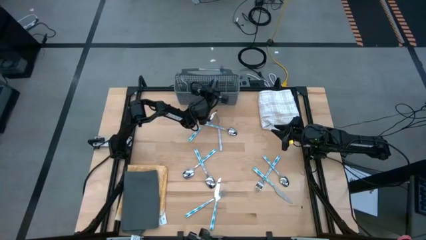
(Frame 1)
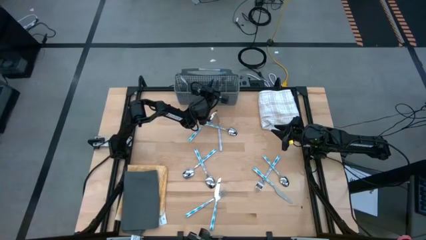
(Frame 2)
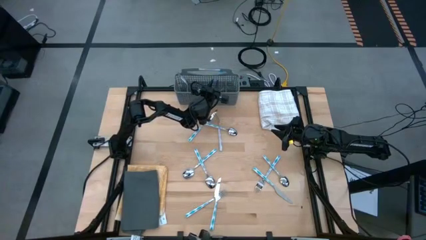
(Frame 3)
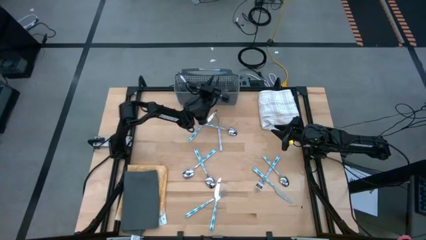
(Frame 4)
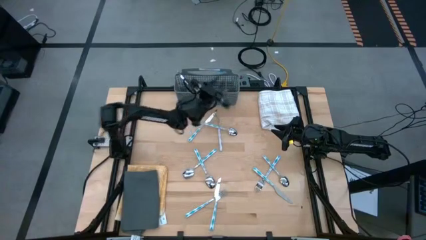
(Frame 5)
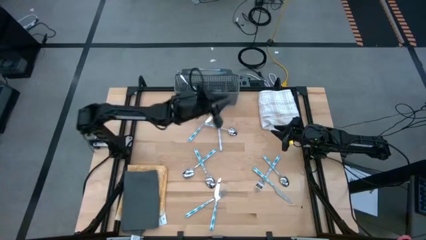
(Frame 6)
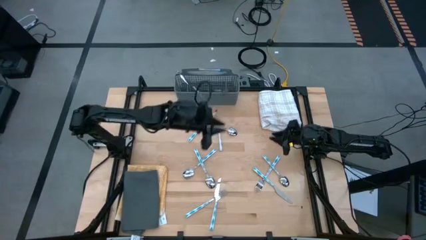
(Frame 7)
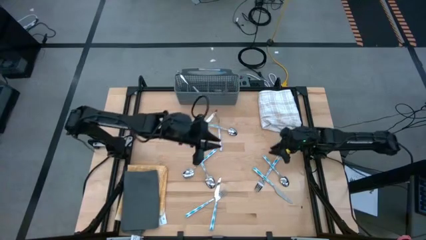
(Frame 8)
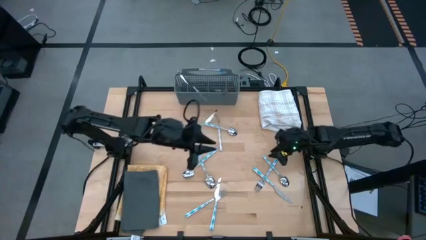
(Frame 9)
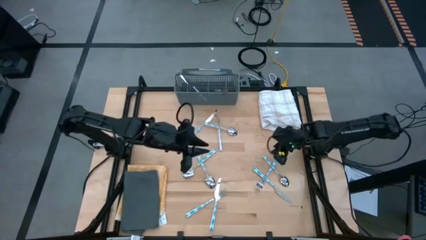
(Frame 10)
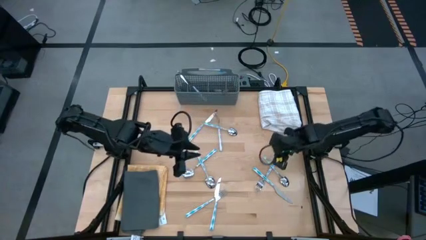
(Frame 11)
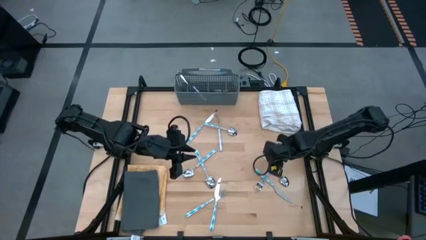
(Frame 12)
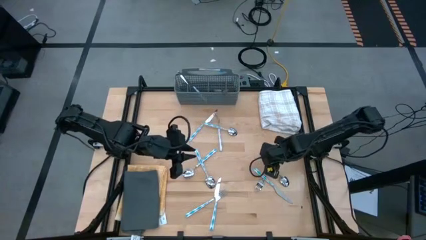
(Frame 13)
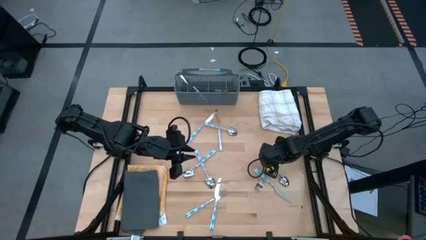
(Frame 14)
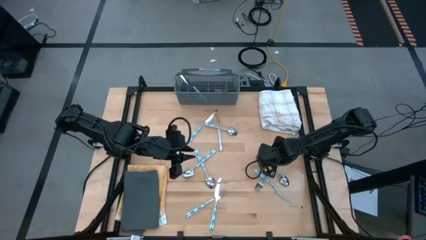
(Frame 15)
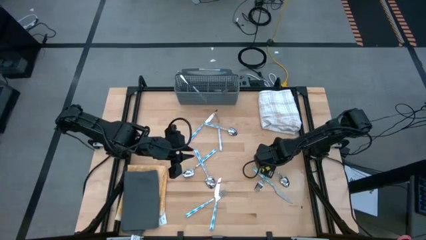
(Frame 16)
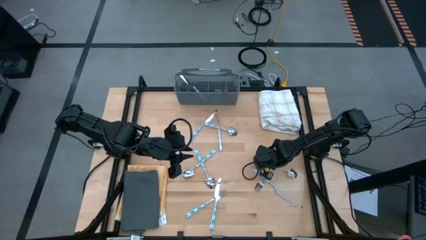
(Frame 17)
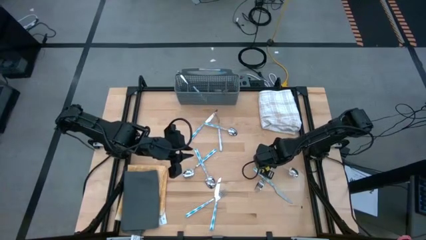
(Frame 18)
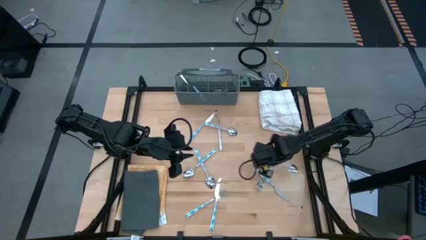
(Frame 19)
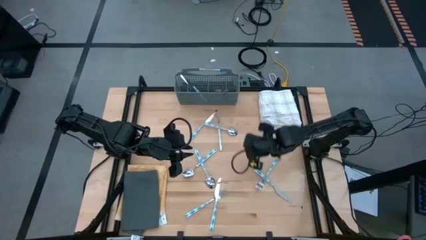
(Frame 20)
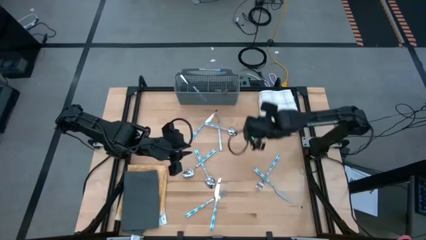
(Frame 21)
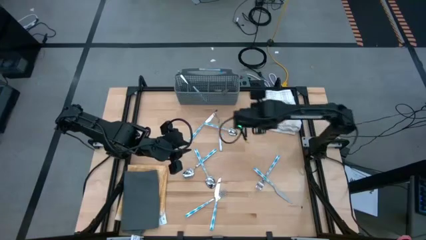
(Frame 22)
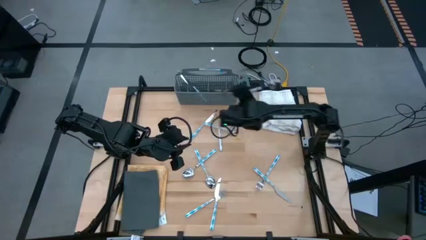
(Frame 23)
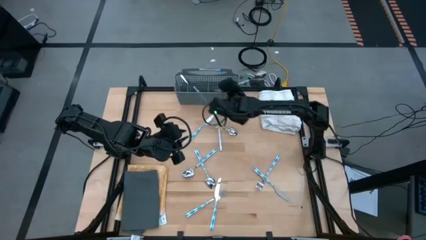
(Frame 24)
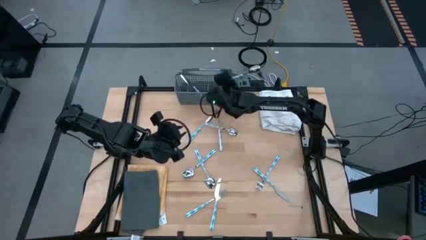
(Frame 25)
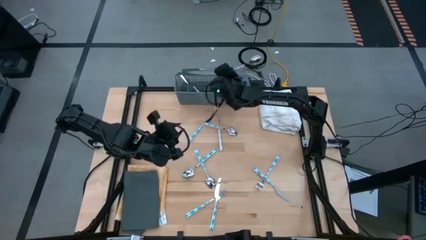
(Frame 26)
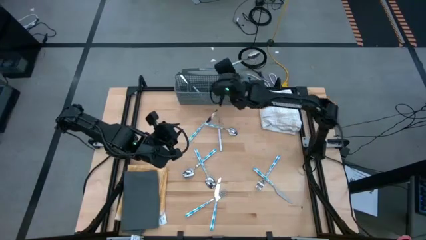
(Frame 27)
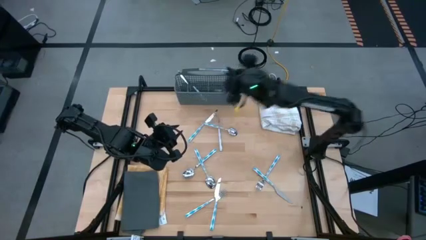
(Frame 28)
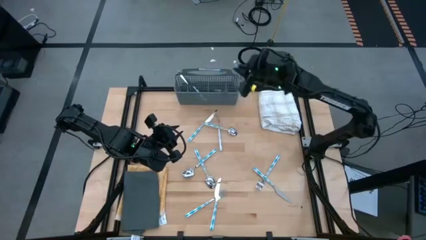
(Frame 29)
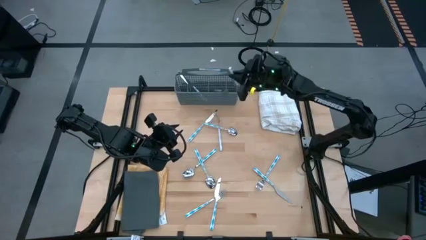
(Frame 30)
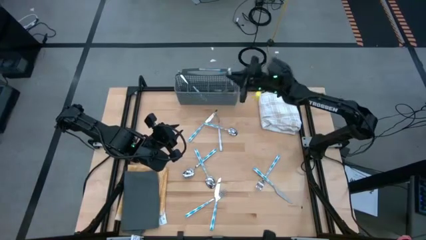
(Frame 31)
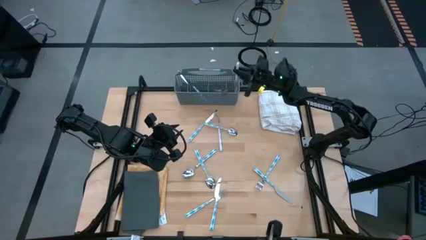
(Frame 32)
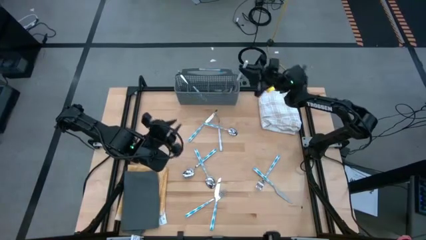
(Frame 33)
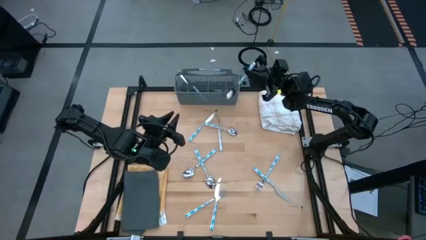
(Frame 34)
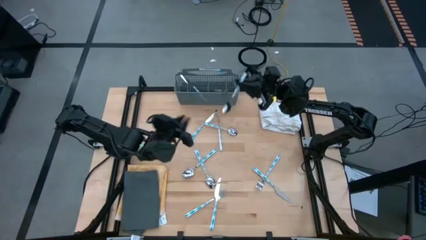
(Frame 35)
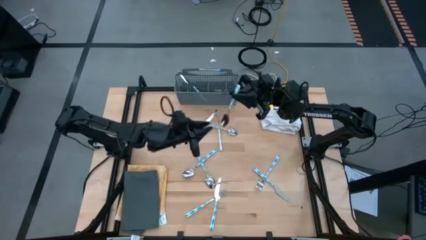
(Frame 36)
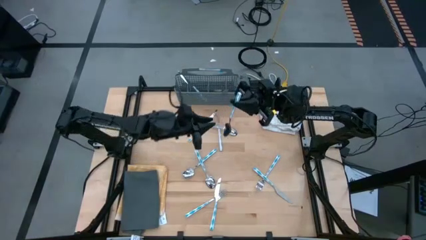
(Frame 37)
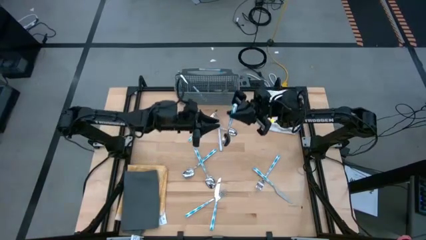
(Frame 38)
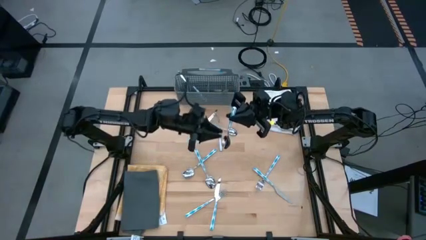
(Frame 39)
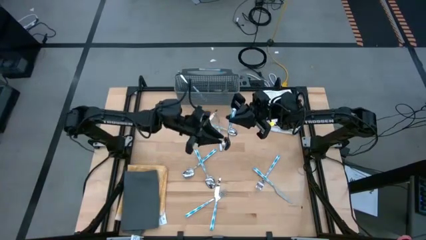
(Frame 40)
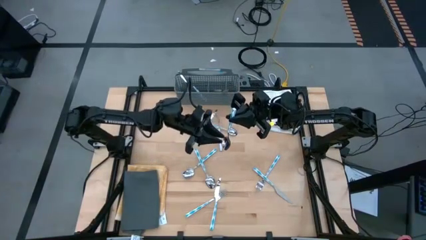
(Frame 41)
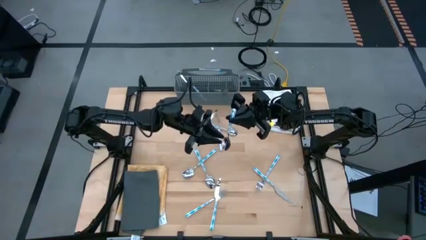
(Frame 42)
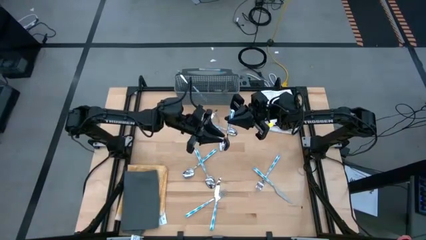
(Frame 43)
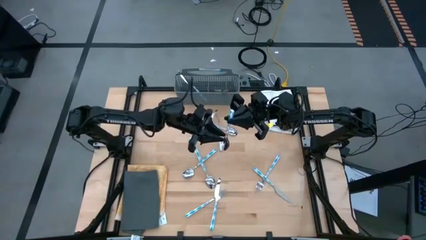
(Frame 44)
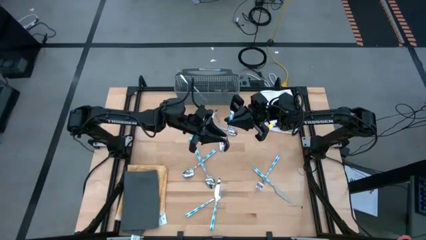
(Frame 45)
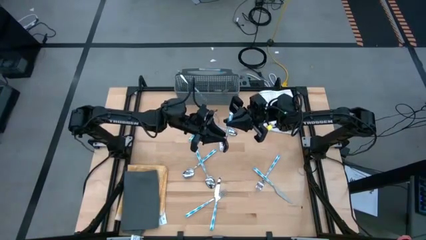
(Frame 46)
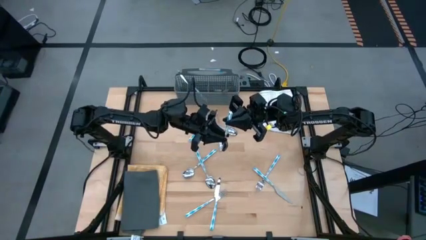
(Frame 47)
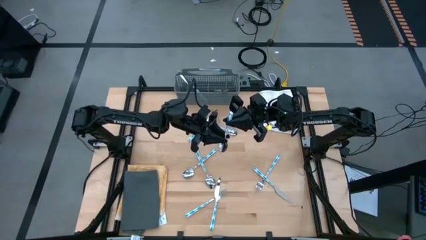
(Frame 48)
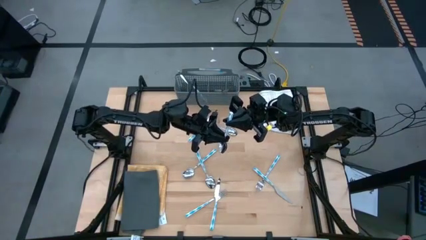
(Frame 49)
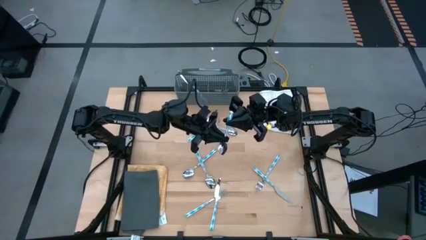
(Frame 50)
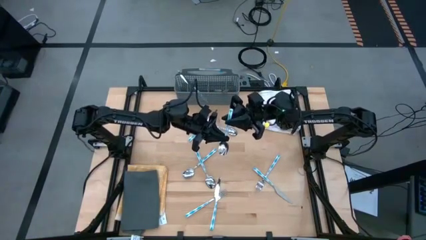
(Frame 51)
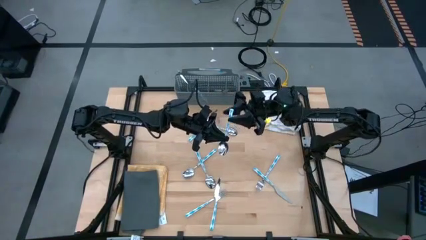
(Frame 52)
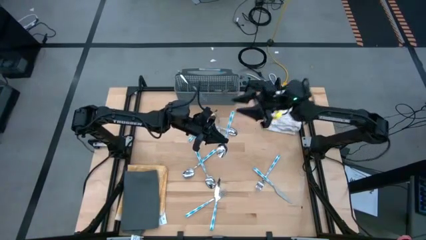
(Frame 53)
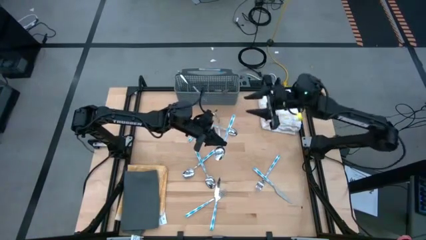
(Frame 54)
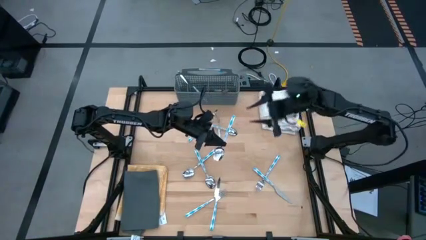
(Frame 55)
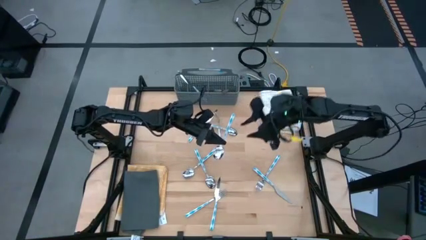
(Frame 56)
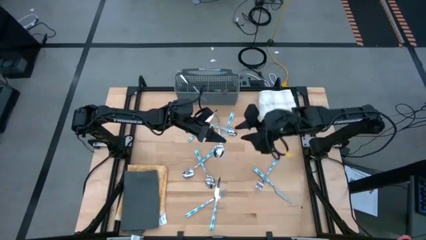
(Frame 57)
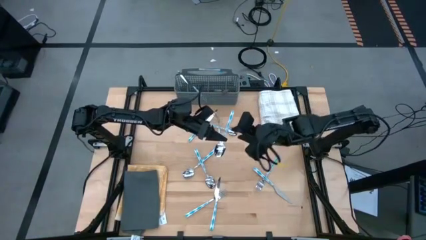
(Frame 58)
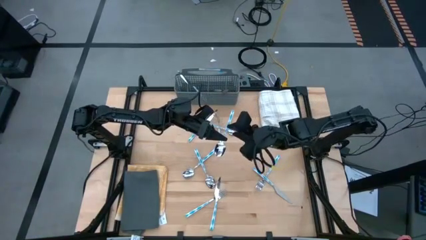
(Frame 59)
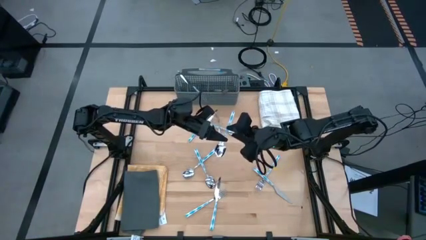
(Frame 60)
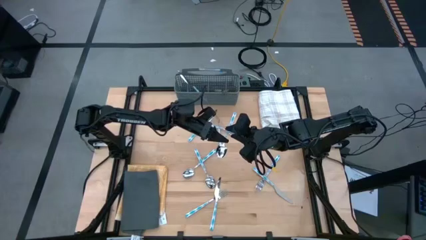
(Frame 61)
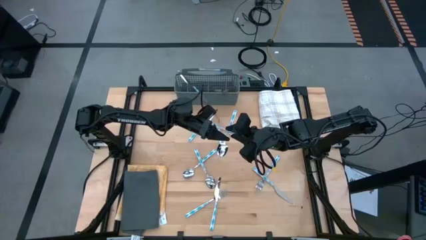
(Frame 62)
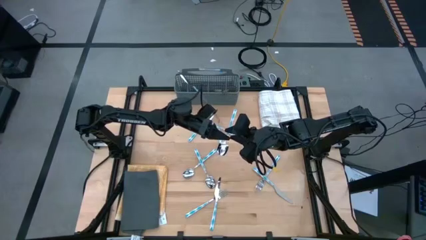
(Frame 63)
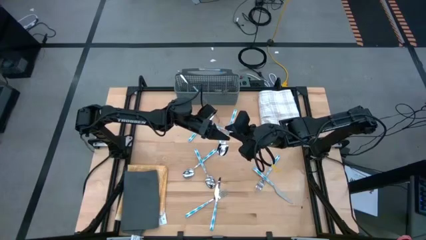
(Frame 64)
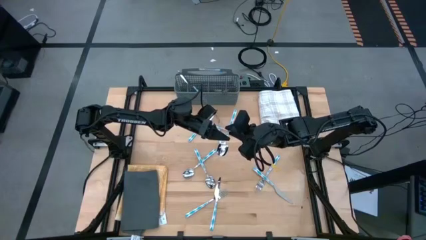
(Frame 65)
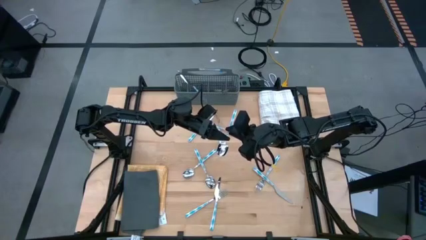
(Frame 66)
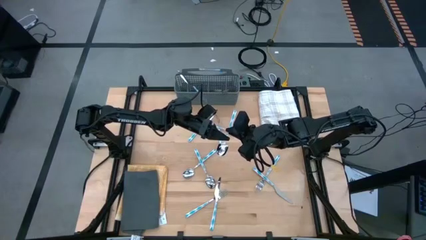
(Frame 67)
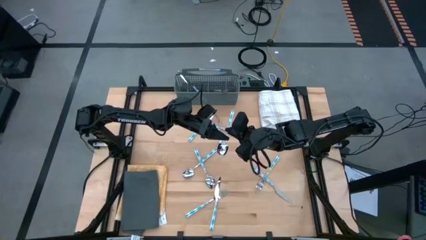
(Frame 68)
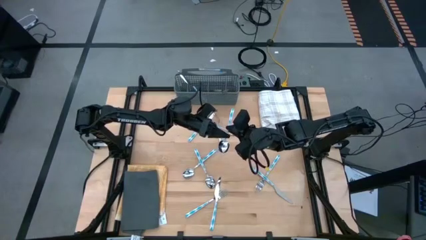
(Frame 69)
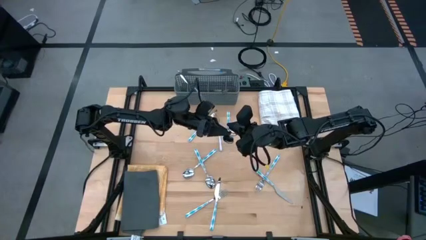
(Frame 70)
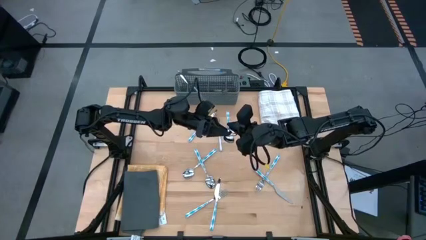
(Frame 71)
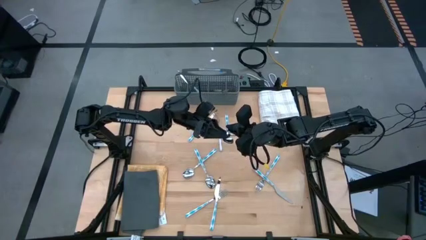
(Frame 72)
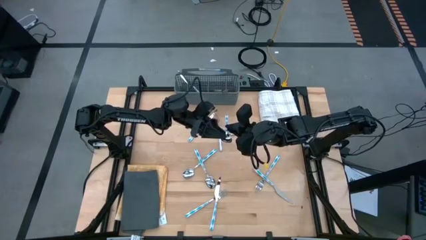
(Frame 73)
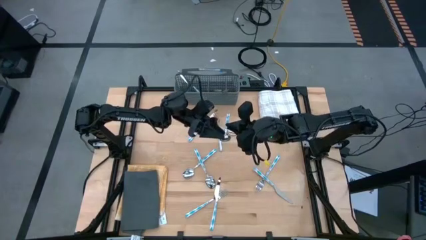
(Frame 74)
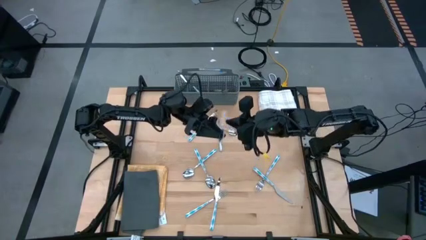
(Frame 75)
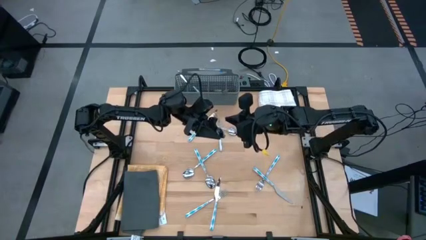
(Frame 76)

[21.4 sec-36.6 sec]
Task: Sort silverware
Put the blue spoon into the gray silverware rack
